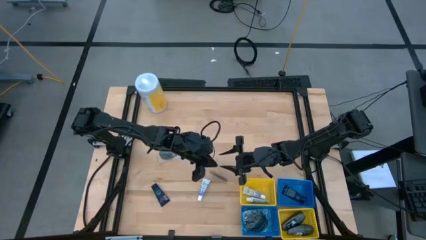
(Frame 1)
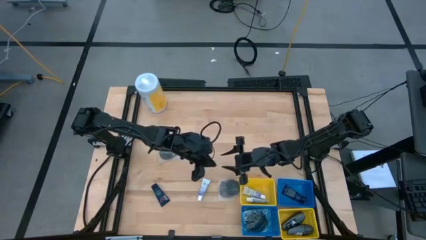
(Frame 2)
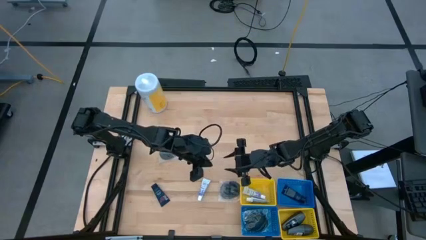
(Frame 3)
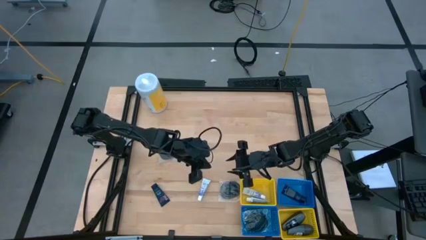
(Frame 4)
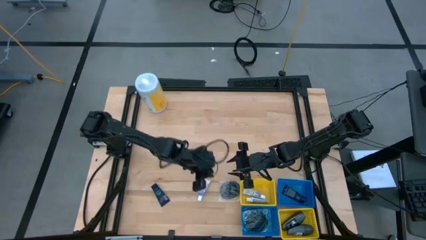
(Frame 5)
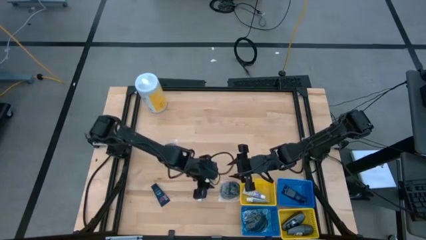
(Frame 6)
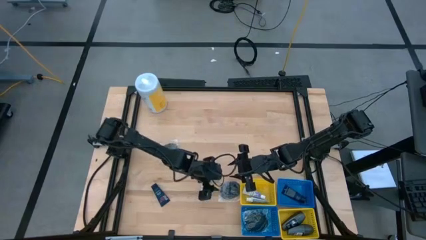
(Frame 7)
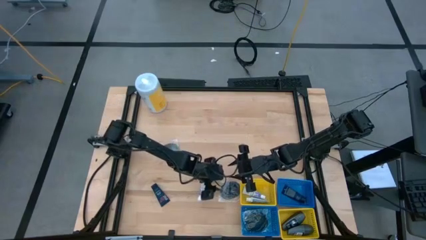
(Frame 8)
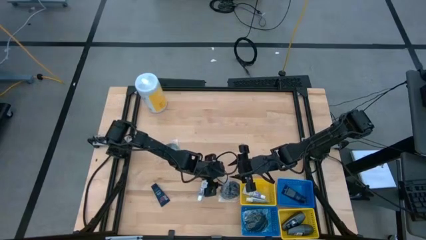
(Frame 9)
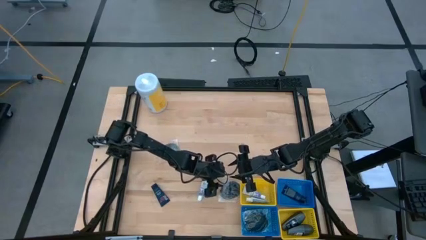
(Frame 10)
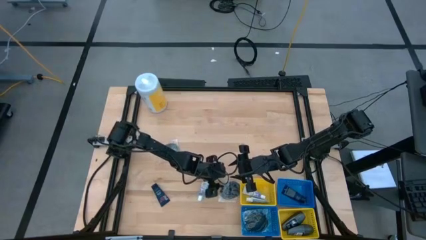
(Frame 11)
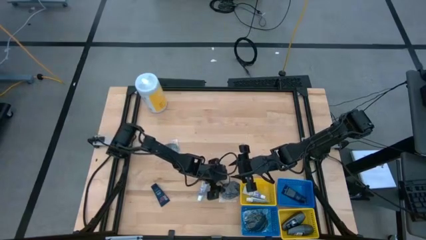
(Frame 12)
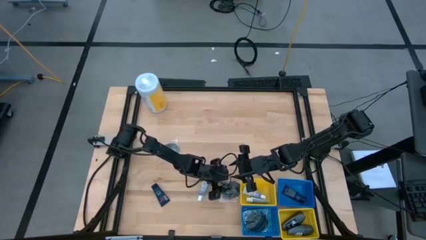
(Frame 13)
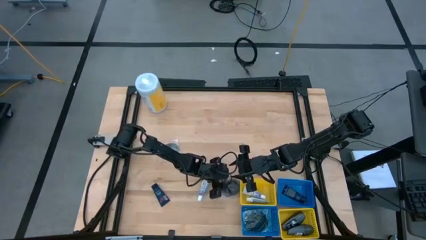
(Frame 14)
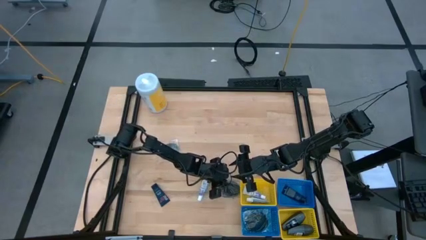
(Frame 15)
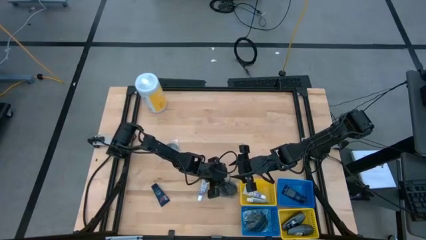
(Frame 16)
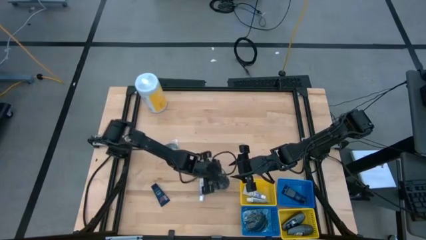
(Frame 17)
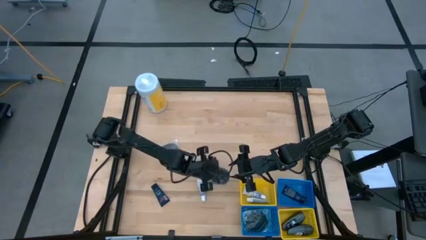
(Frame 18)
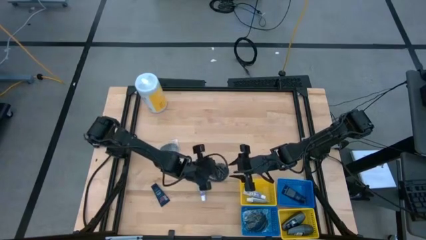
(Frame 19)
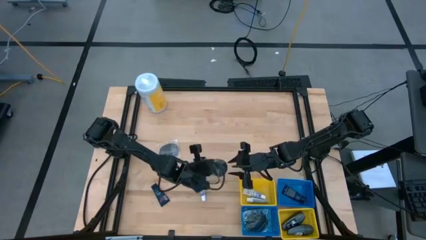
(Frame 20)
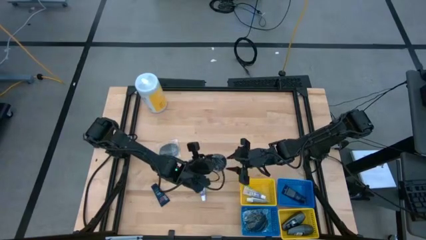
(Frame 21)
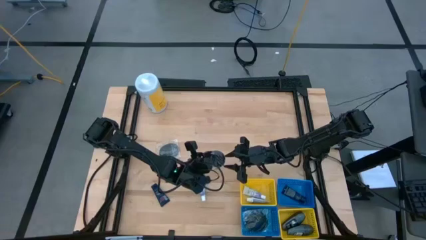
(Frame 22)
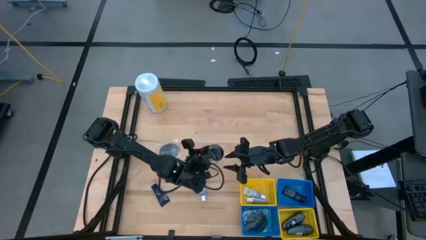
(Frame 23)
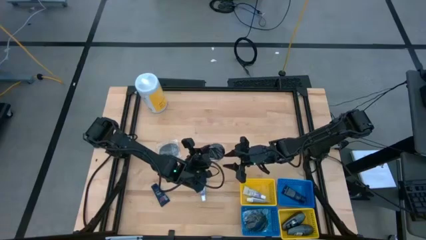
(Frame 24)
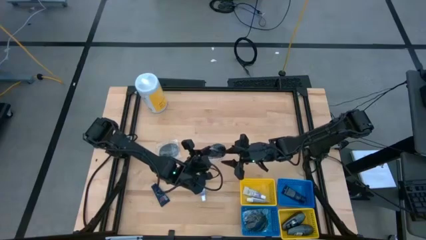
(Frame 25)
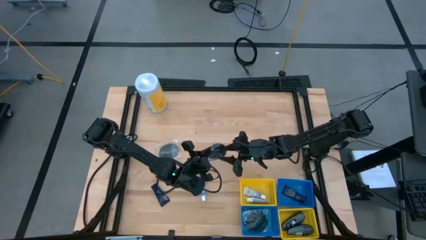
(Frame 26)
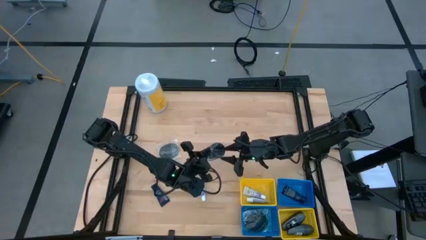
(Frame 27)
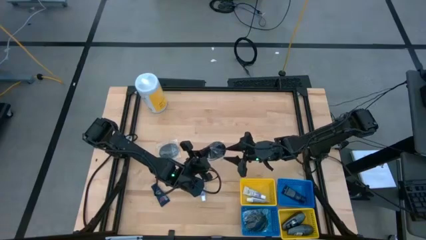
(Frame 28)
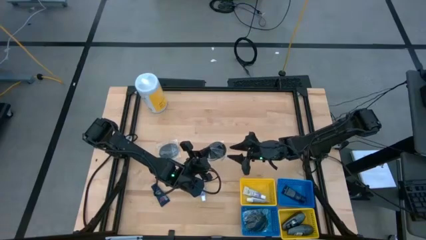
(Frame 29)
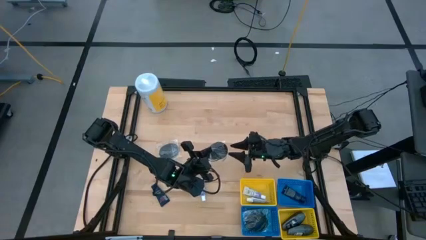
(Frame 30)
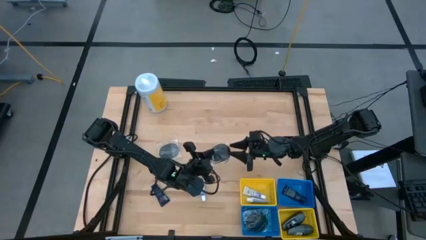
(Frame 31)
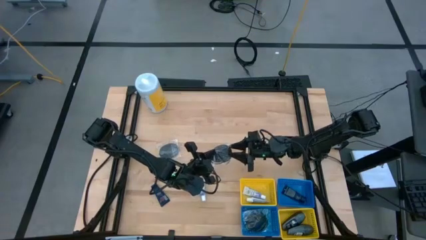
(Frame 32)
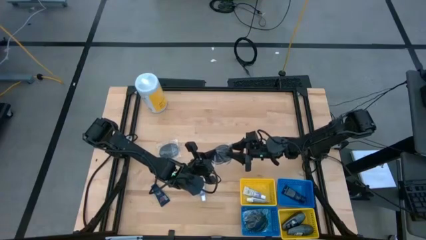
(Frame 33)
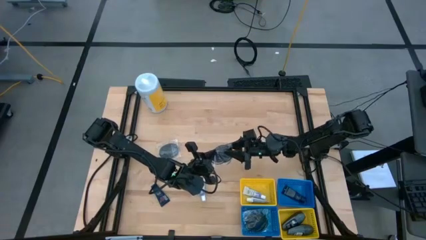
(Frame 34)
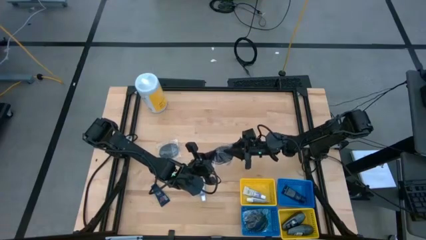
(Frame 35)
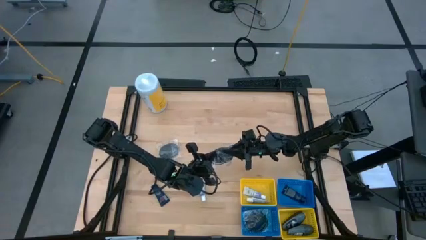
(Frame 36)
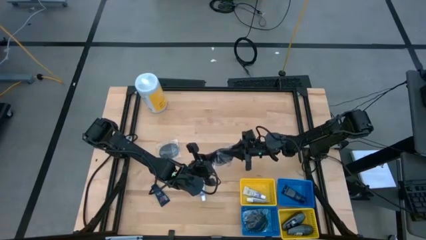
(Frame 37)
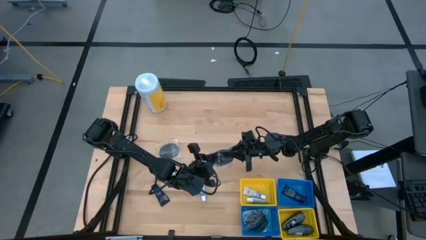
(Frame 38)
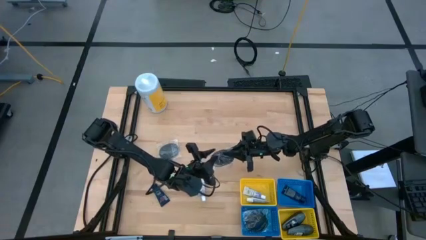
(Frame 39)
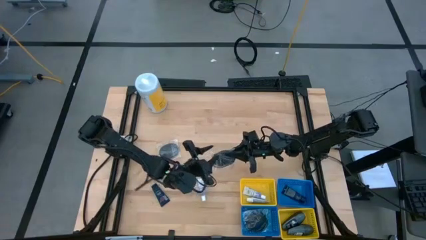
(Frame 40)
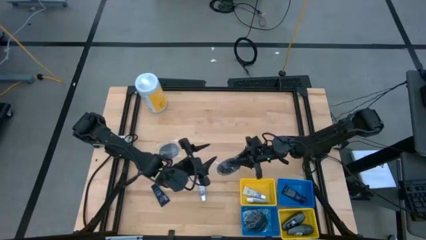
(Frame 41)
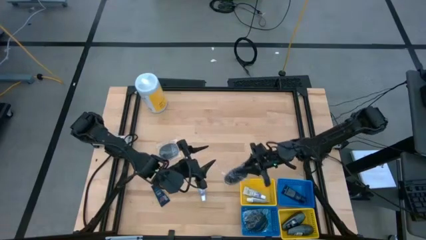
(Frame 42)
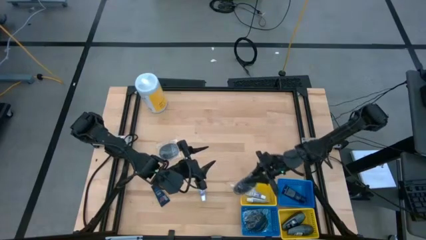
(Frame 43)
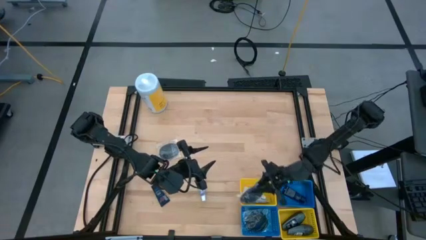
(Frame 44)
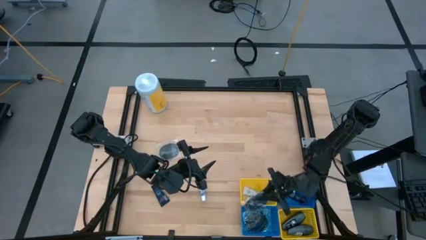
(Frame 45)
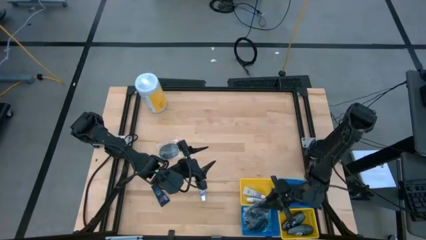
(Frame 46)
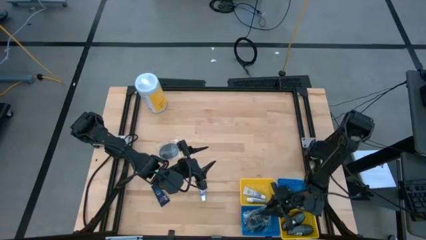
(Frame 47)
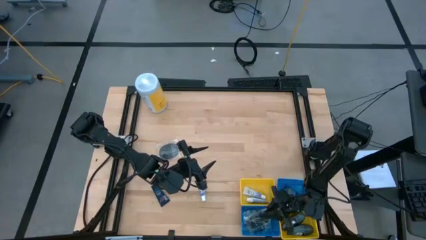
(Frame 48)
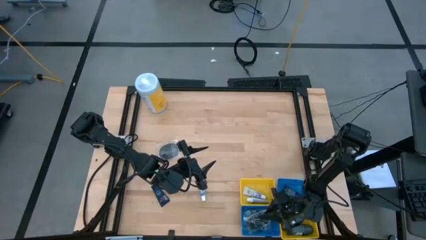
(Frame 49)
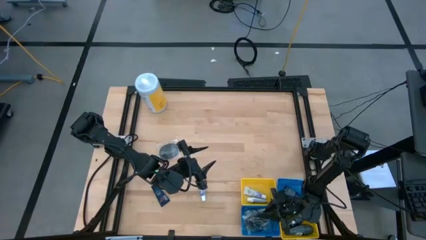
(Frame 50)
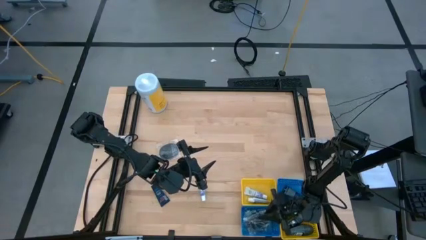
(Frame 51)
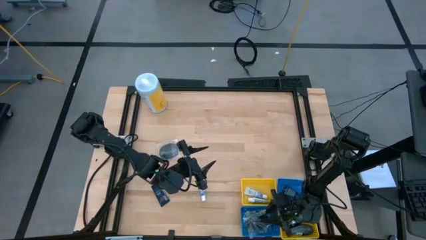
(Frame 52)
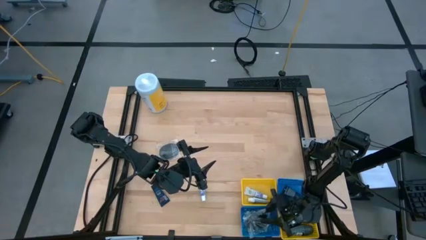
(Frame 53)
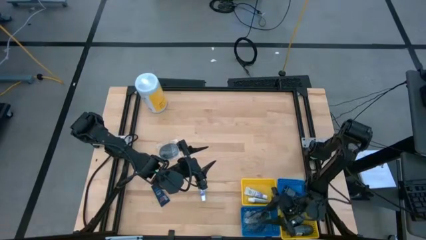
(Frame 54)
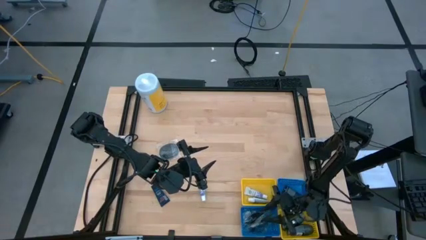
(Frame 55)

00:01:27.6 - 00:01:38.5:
Task: Pick & Place Travel size toiletries
Put the black hairbrush into the bottom blue bin

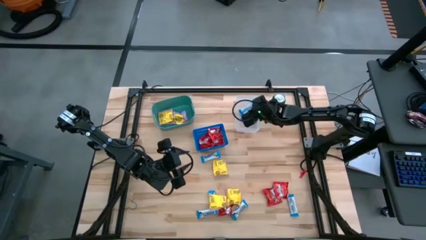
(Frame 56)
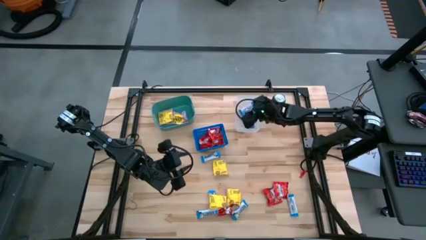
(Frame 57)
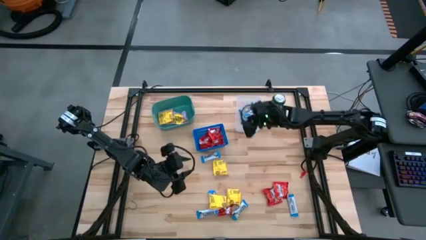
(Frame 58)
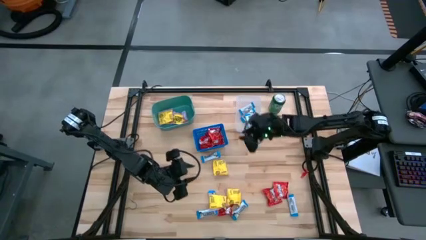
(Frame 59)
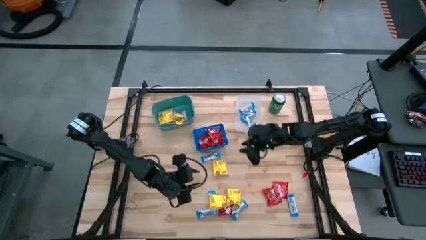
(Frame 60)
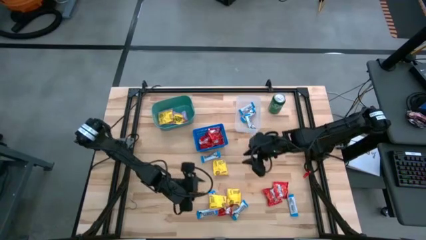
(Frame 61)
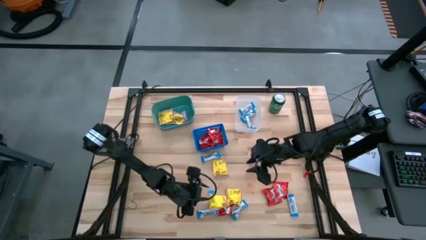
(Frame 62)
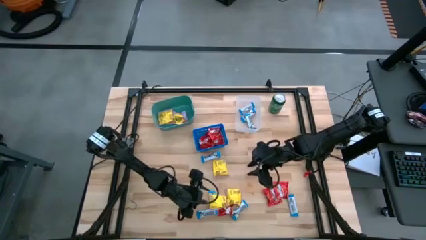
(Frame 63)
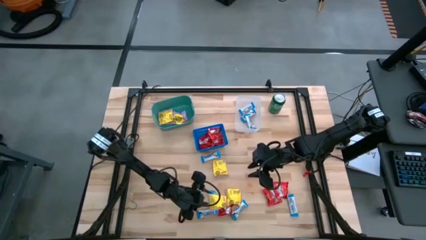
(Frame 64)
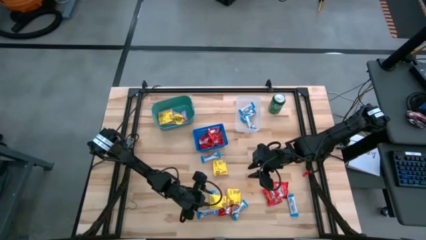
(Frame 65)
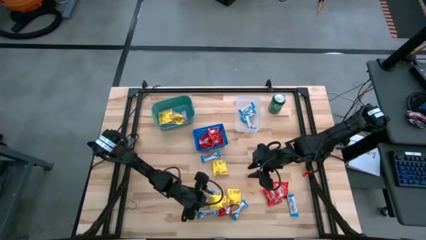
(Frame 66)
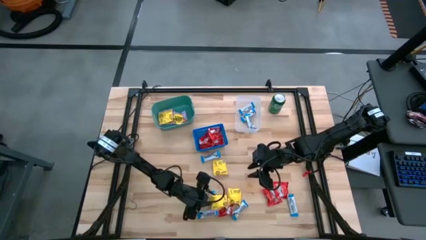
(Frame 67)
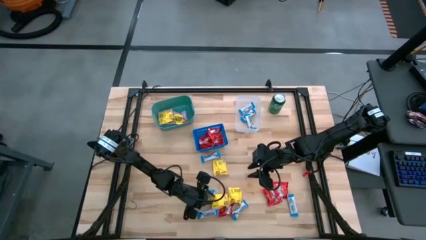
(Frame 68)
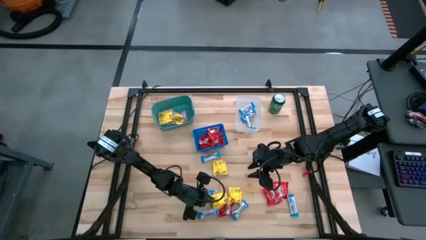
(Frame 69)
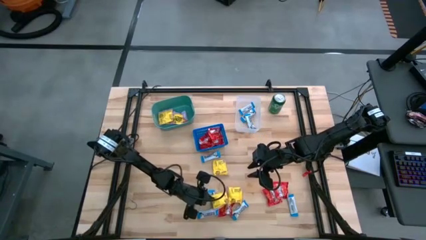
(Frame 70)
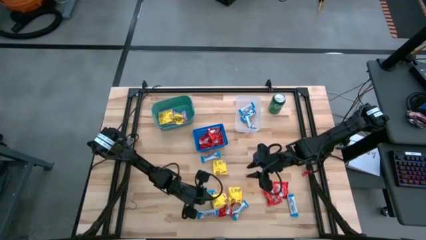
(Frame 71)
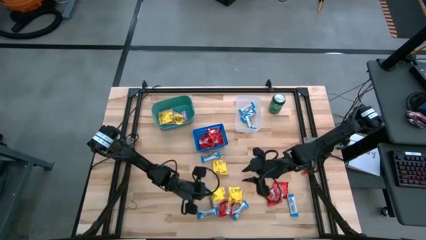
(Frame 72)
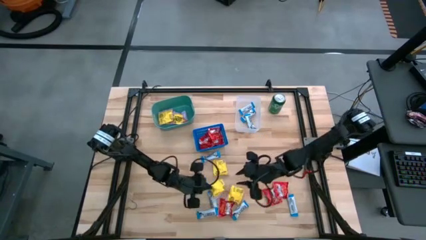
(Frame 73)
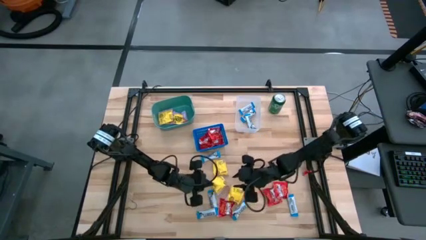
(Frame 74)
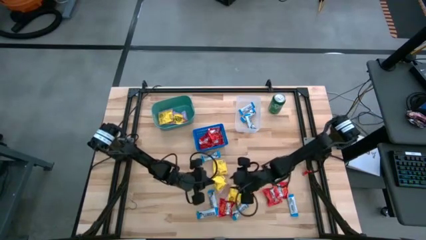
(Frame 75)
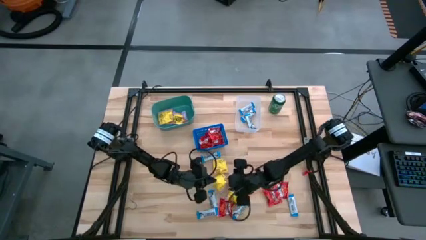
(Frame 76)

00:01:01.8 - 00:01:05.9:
Task: Sort candy
Put the sour patch candy into the blue green bin

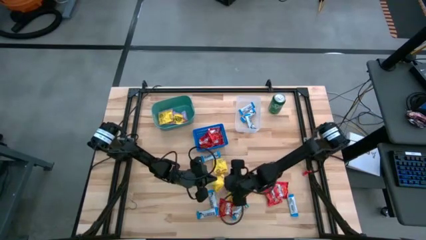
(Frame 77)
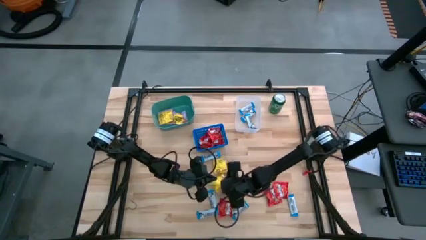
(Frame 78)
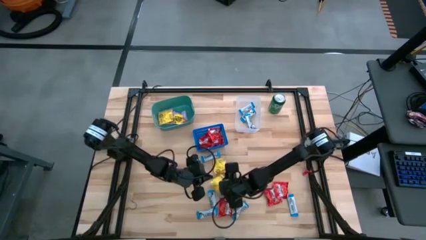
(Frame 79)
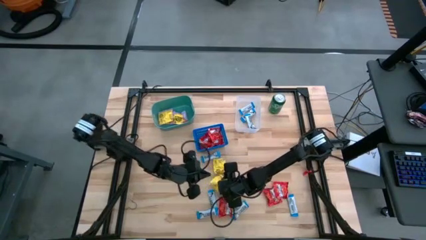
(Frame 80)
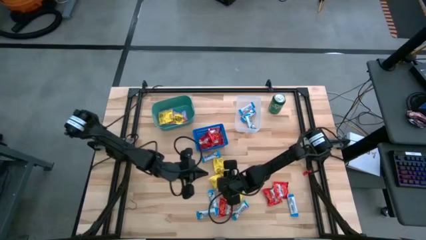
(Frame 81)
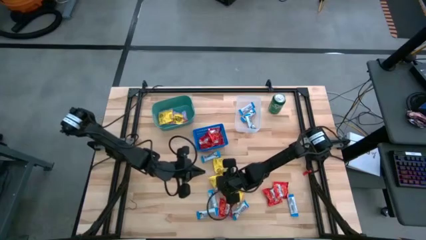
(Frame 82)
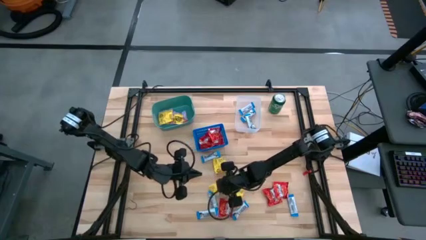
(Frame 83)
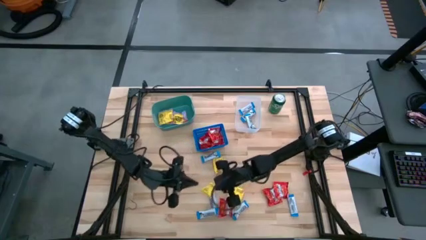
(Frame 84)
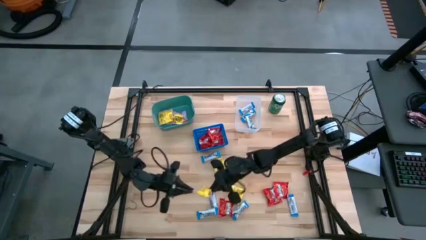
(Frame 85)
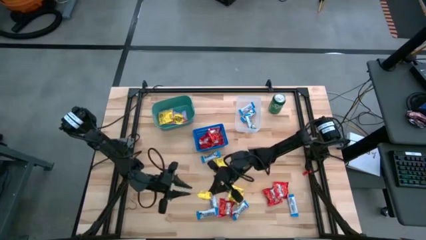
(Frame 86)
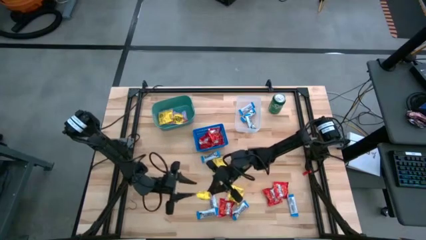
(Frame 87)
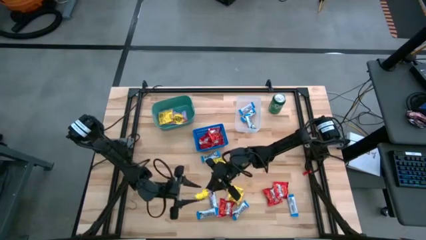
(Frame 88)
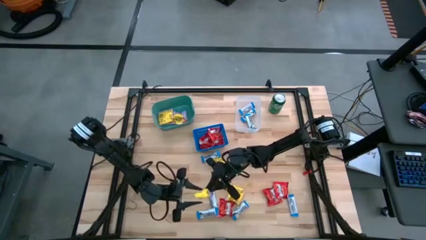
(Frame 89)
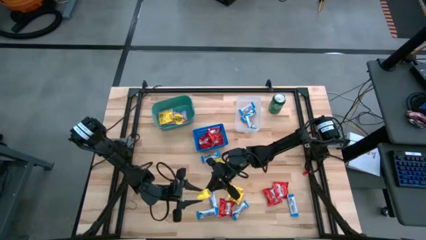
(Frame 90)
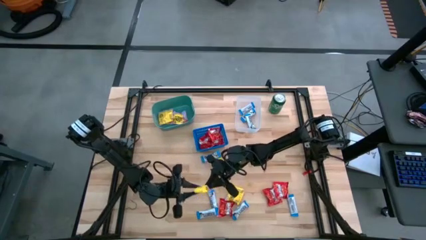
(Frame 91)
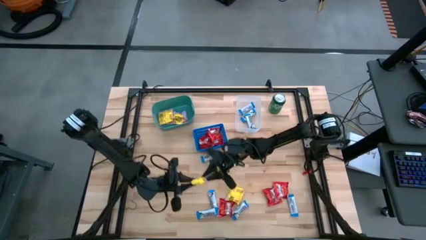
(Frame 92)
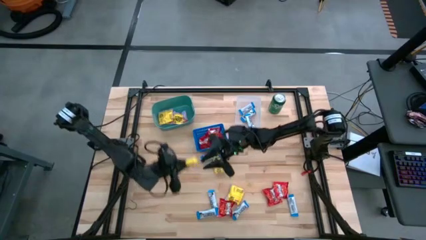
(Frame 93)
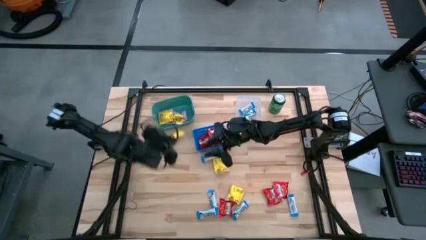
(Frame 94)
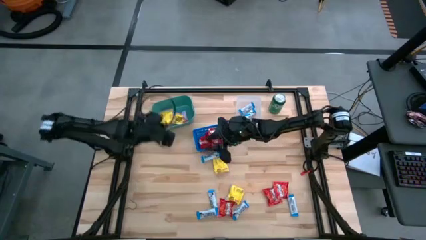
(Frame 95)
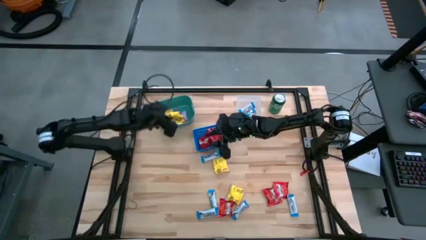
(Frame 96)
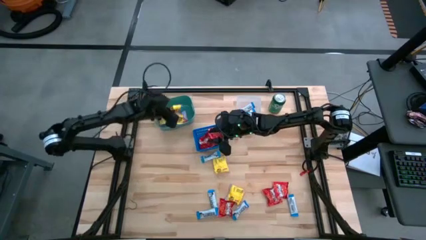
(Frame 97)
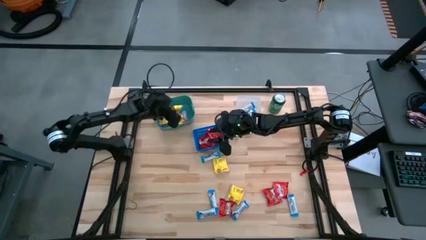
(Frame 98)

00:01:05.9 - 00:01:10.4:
Put the sour patch candy into the blue green bin
